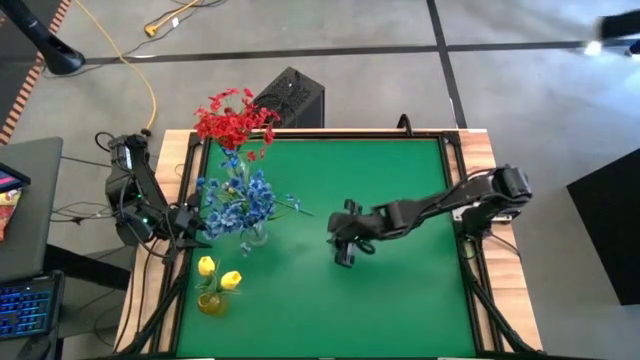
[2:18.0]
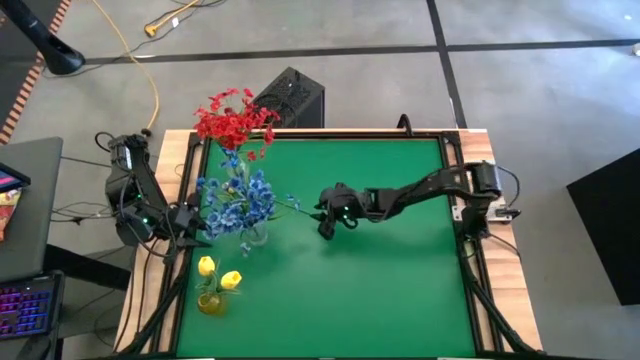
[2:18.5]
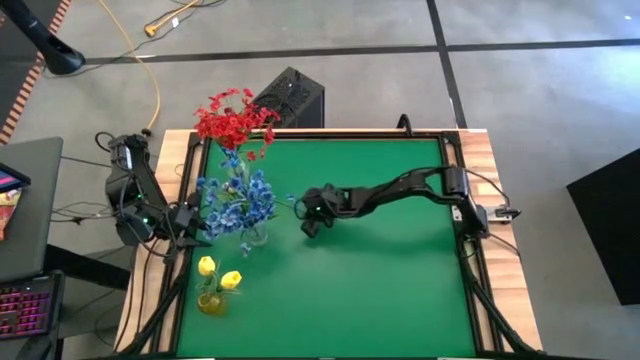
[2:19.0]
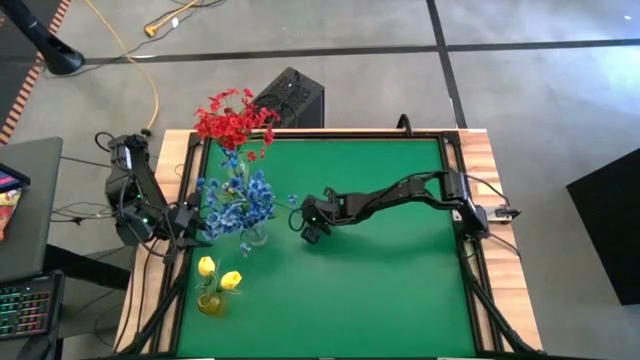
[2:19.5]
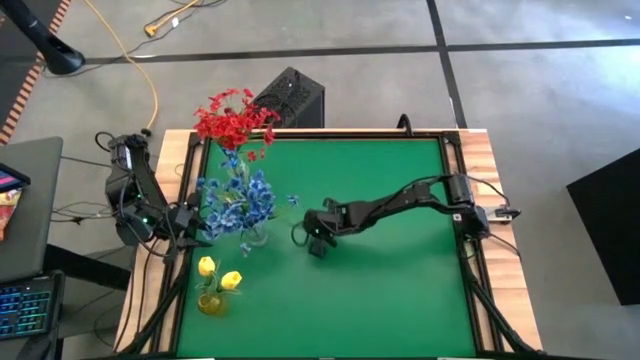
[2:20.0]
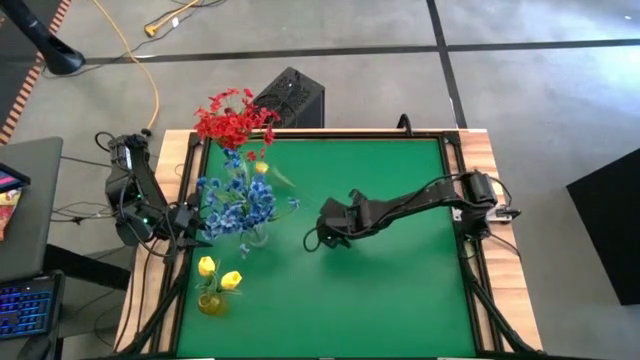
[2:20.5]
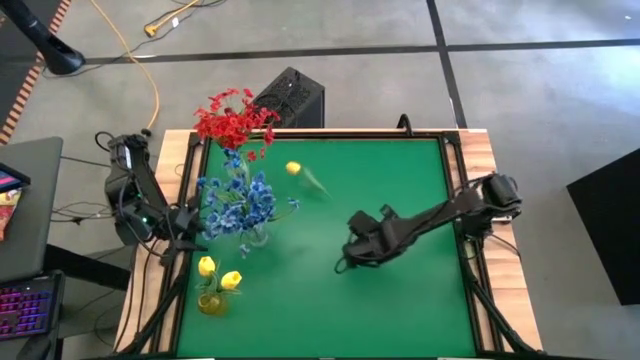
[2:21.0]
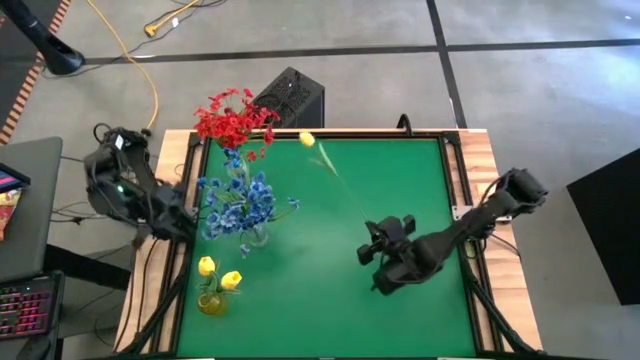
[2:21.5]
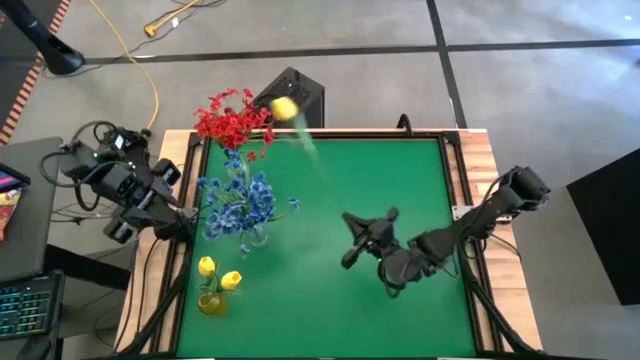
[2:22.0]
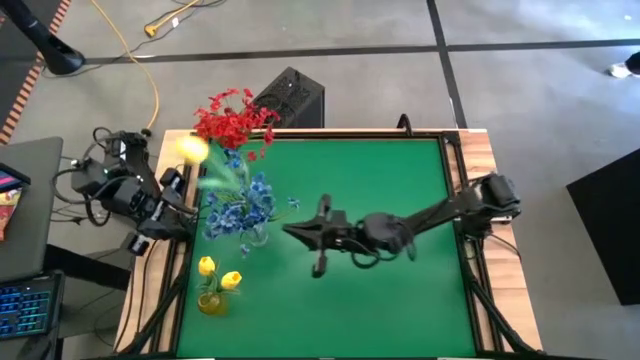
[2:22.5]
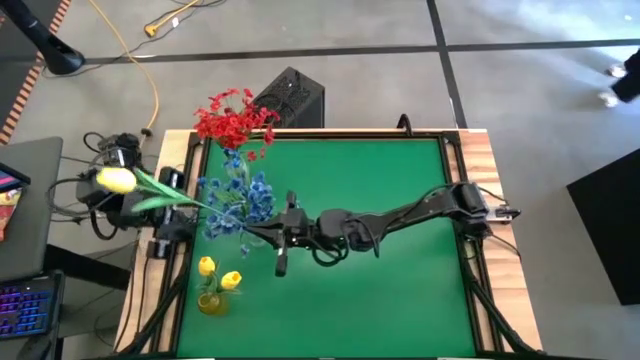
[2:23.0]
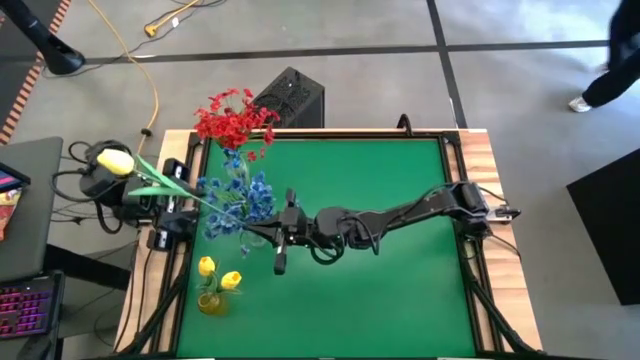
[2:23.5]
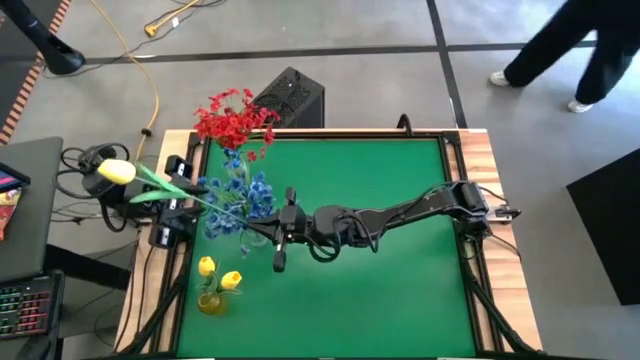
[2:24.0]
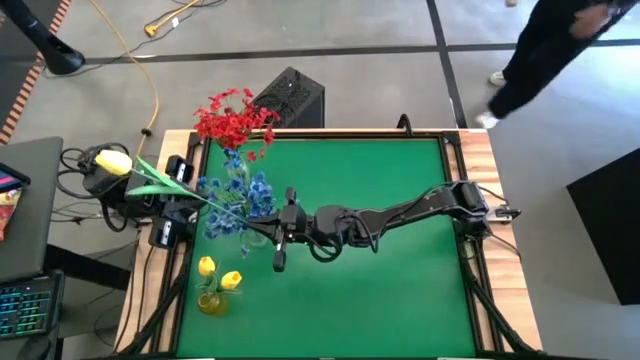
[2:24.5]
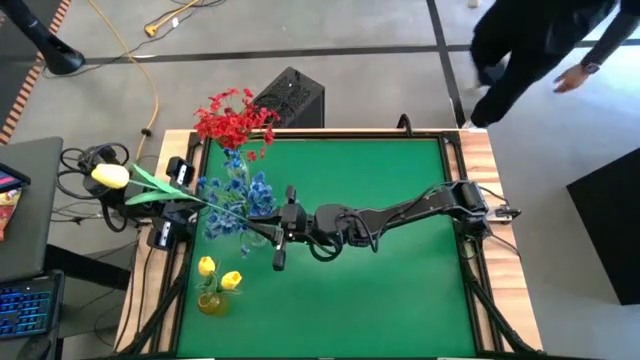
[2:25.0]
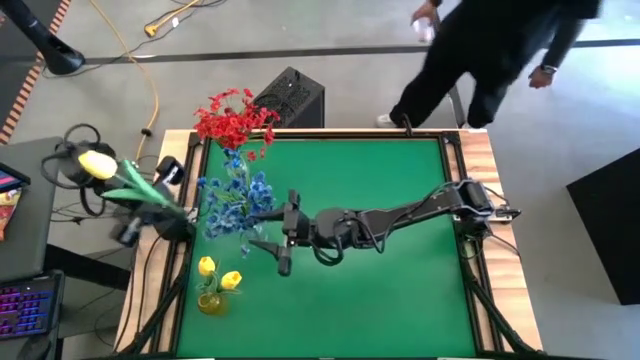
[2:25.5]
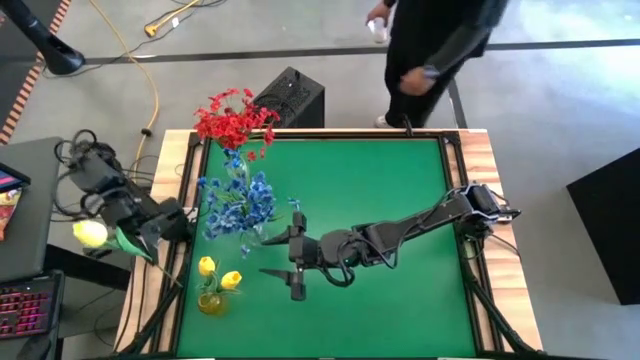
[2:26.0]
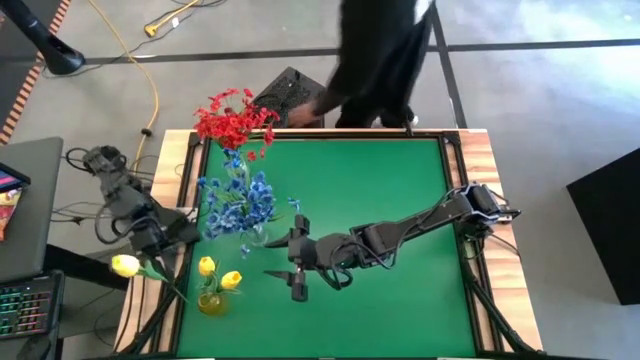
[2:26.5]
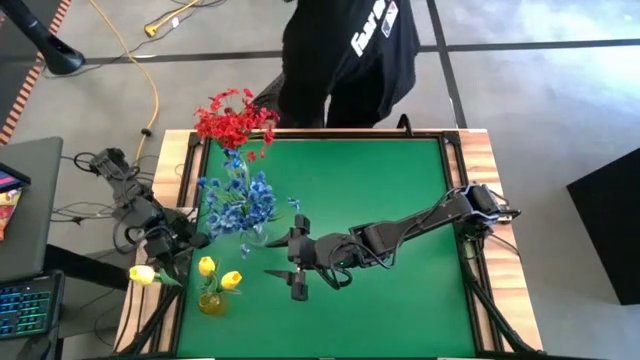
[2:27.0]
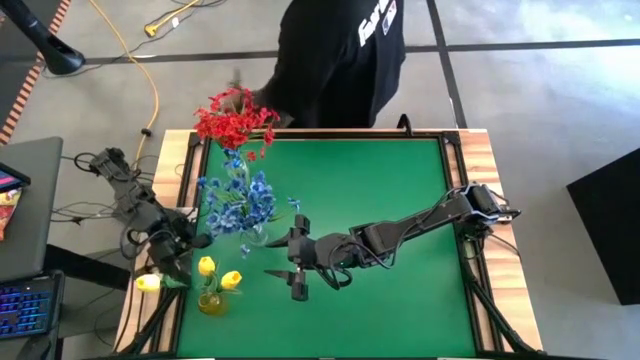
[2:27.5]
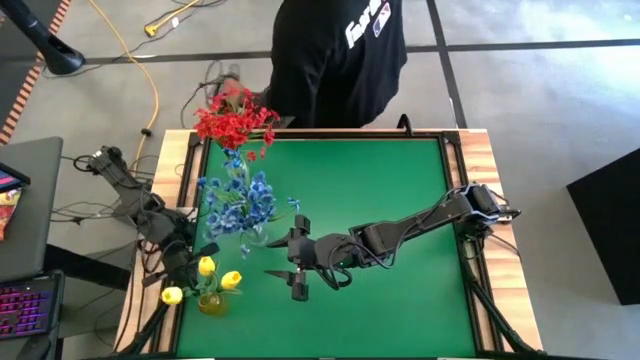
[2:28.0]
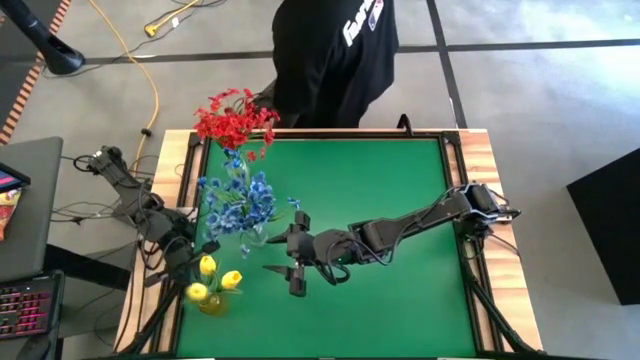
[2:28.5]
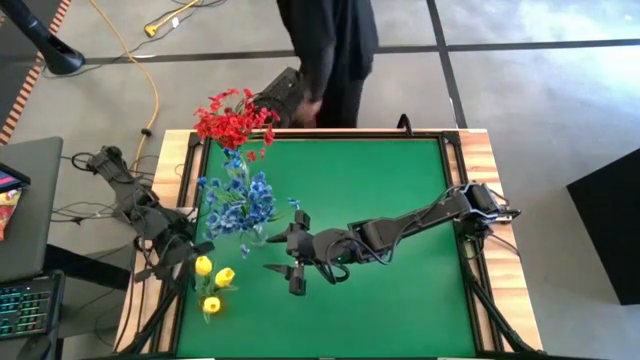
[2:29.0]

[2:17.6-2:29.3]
Task: Sort flowers into vase by color
Put the yellow flower into the yellow vase

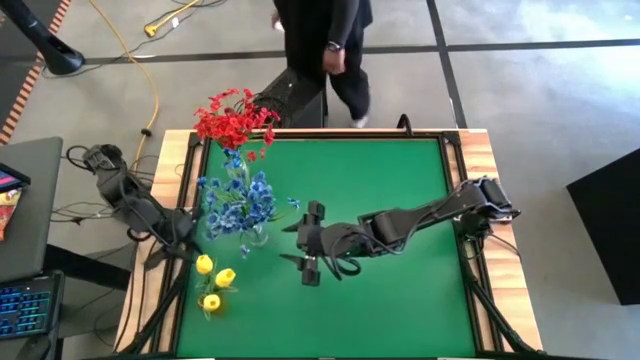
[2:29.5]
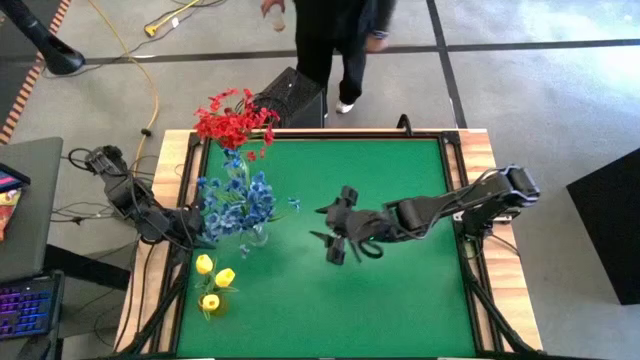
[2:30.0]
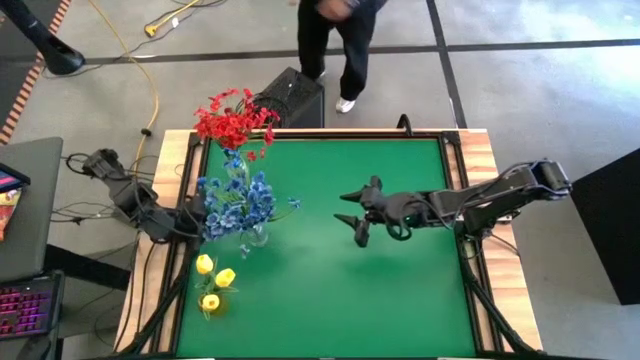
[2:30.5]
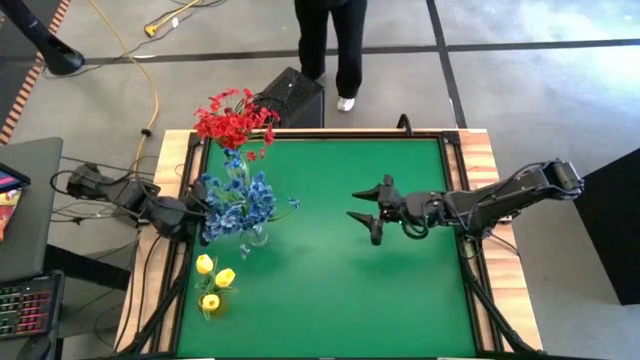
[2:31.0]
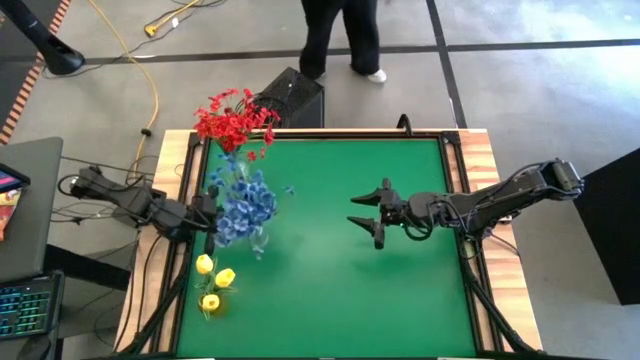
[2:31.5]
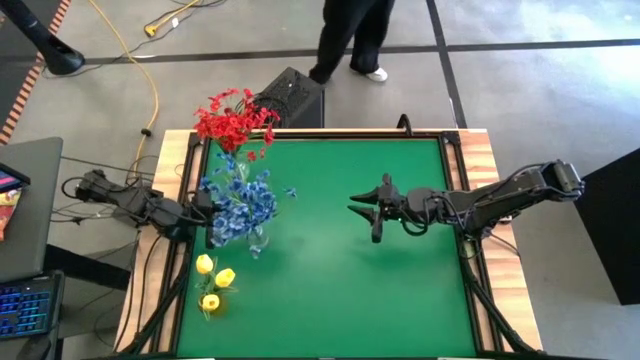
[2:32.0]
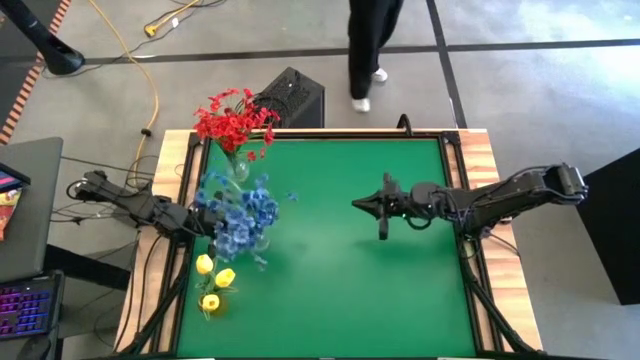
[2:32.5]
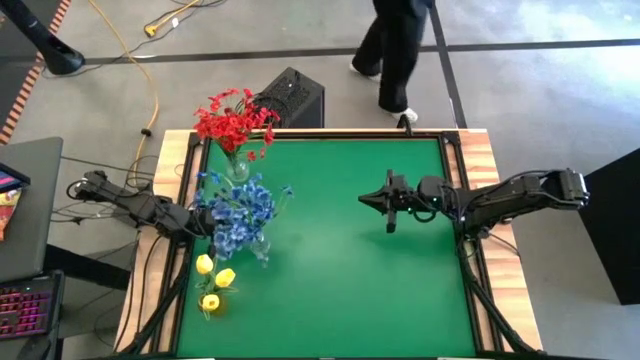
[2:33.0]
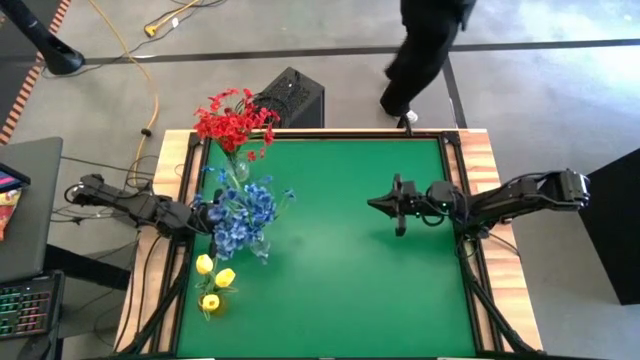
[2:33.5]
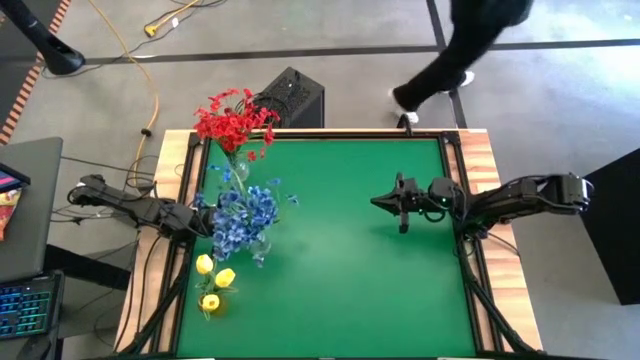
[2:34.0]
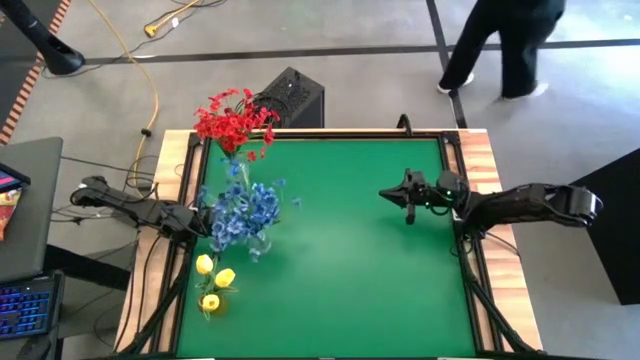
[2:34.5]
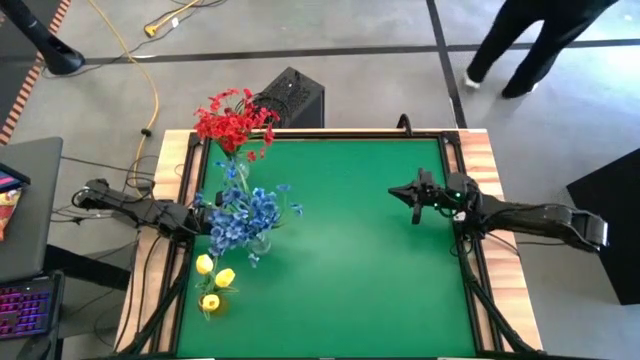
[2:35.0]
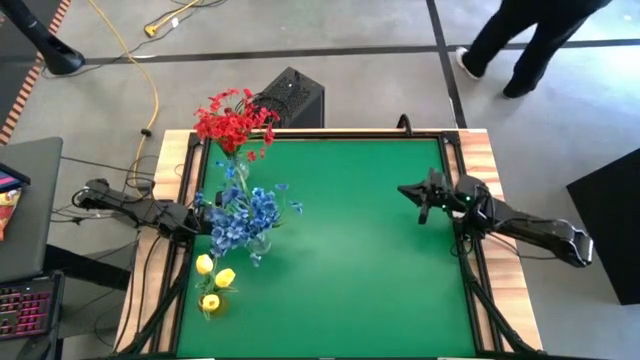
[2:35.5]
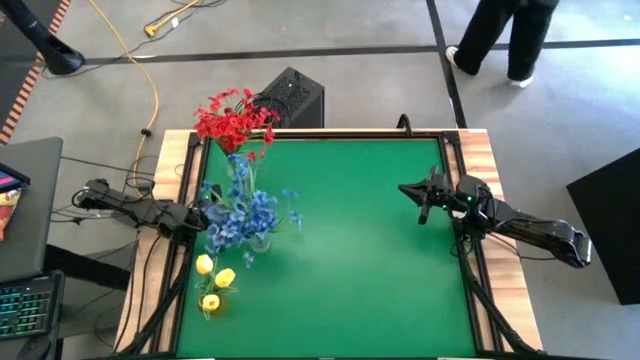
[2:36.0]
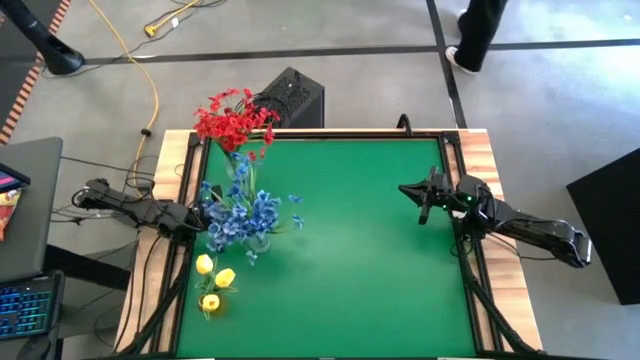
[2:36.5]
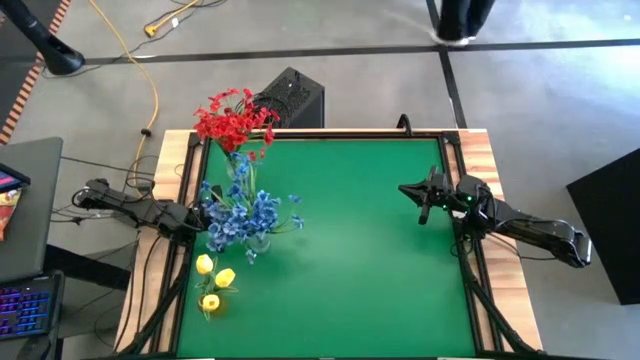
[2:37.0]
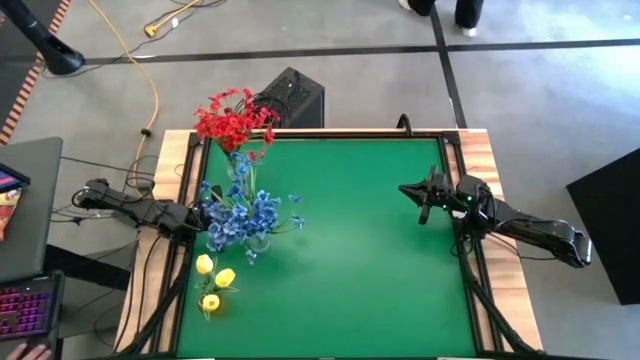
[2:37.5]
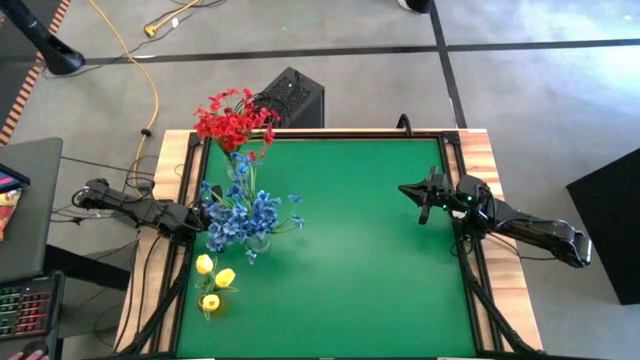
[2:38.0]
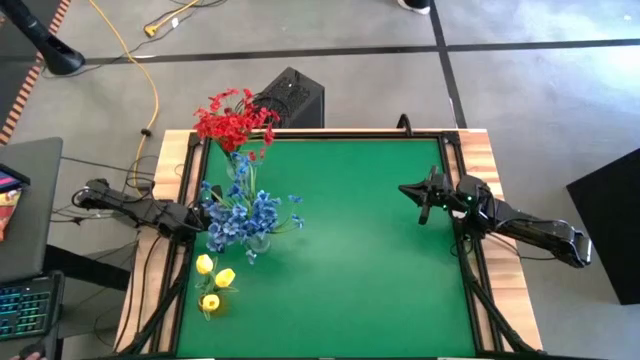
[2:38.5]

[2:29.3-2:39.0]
Return to Home Position
